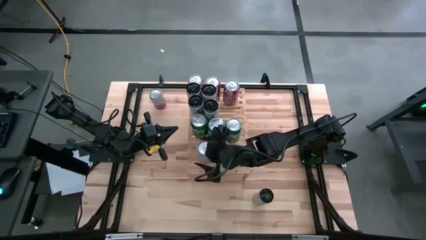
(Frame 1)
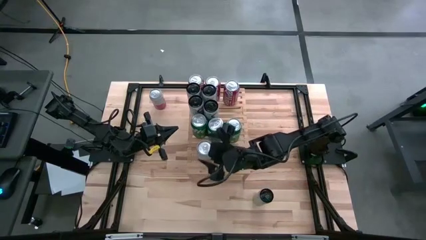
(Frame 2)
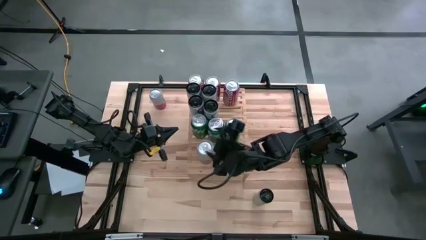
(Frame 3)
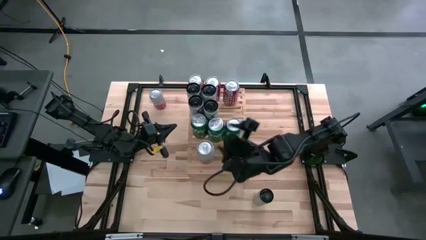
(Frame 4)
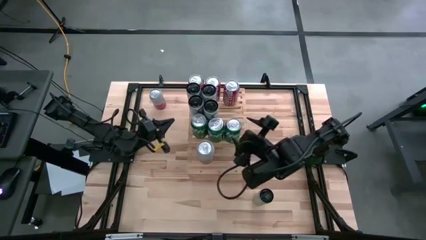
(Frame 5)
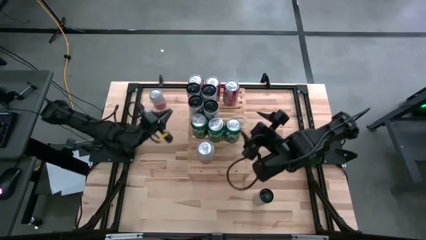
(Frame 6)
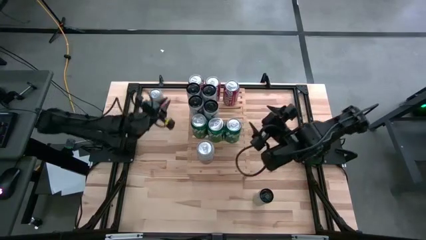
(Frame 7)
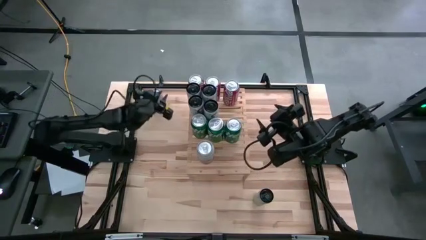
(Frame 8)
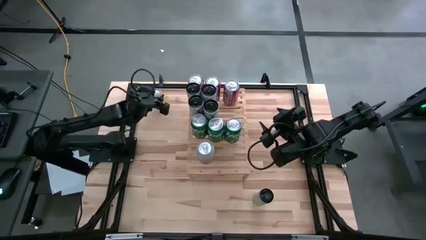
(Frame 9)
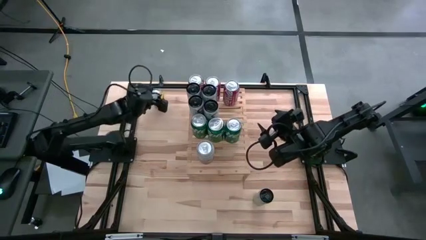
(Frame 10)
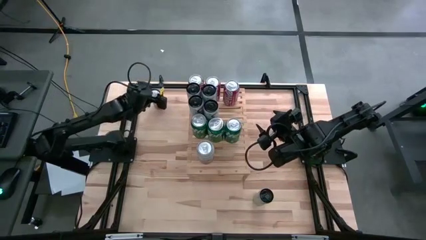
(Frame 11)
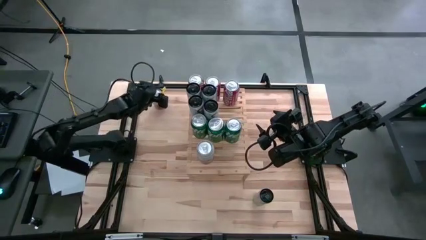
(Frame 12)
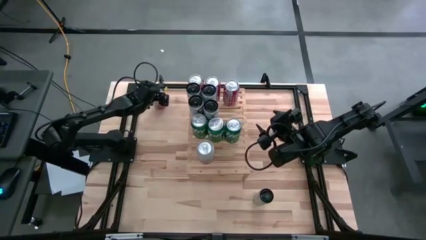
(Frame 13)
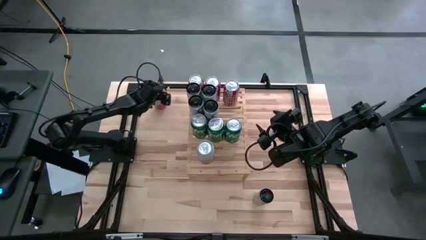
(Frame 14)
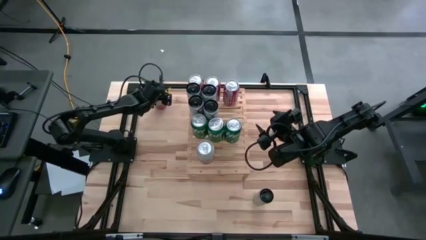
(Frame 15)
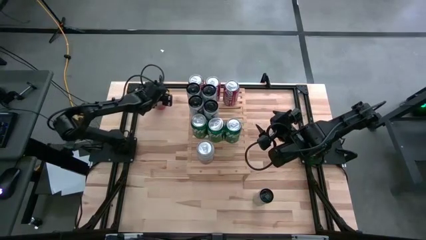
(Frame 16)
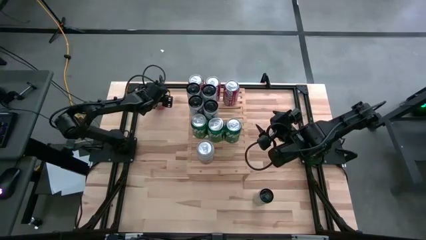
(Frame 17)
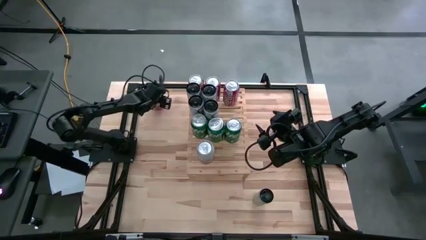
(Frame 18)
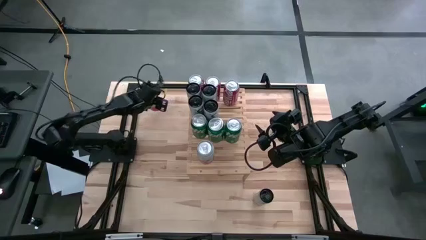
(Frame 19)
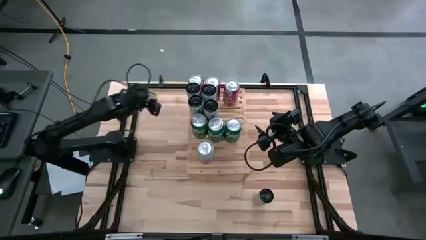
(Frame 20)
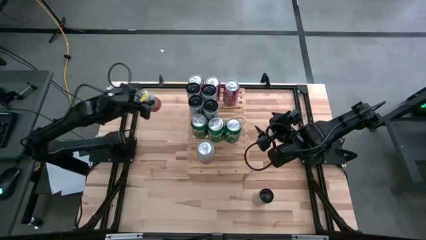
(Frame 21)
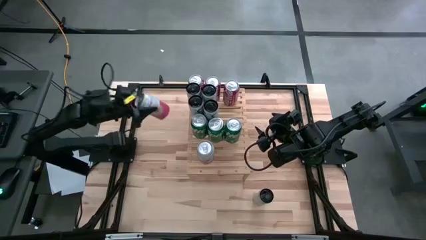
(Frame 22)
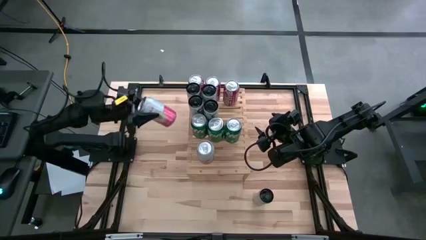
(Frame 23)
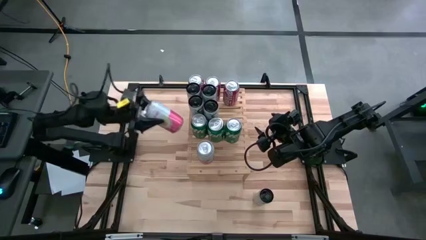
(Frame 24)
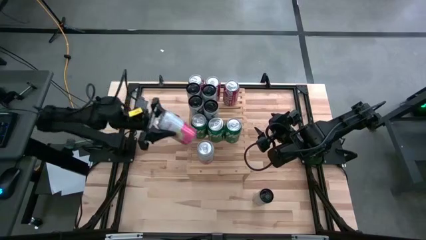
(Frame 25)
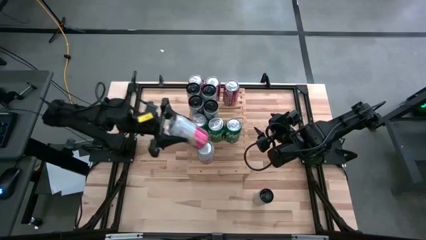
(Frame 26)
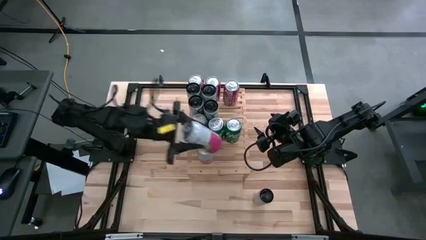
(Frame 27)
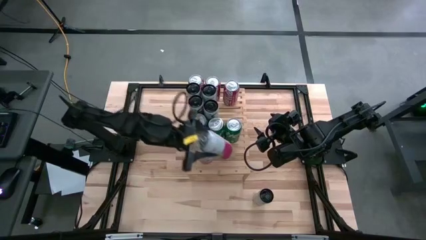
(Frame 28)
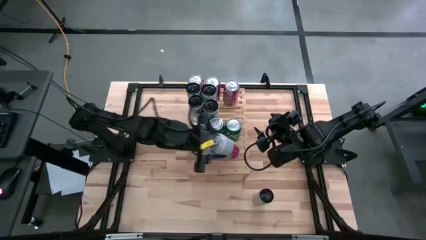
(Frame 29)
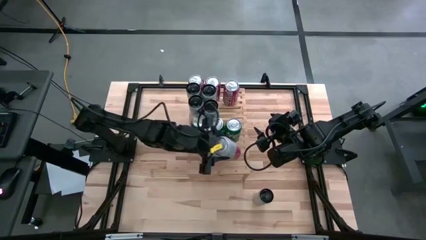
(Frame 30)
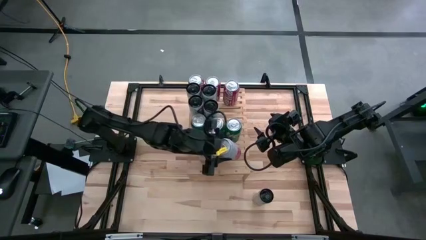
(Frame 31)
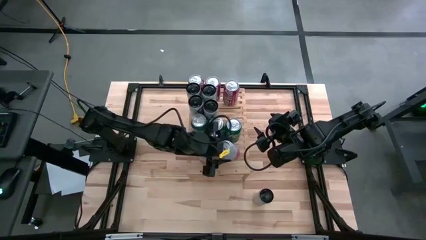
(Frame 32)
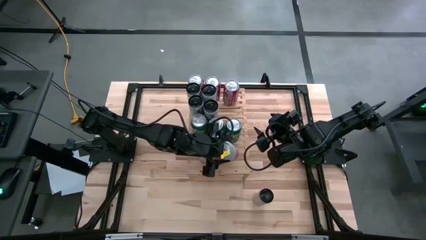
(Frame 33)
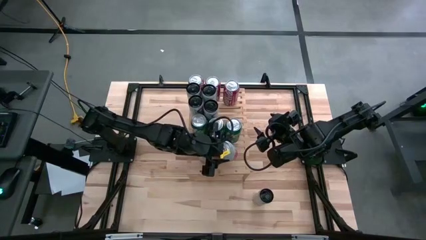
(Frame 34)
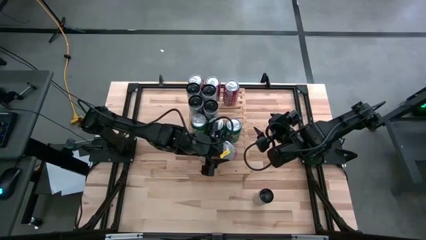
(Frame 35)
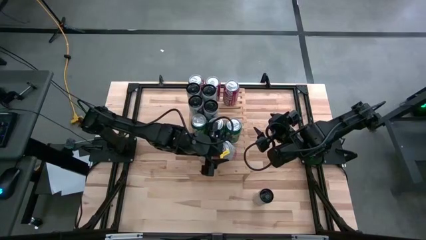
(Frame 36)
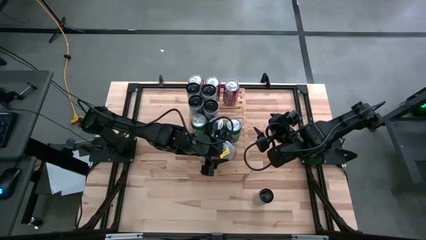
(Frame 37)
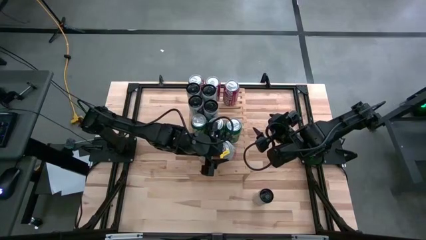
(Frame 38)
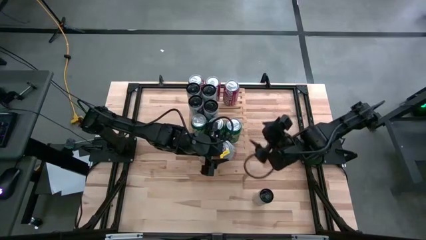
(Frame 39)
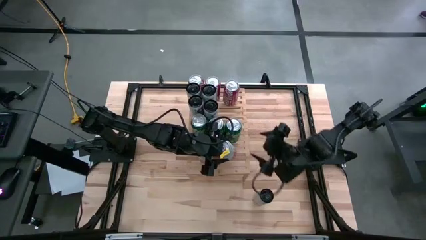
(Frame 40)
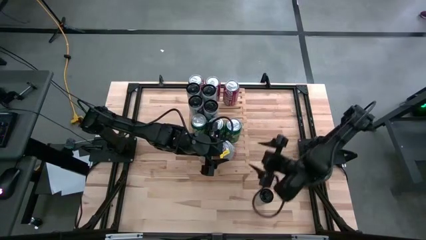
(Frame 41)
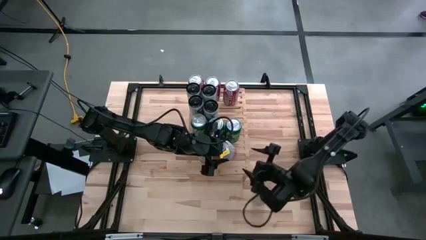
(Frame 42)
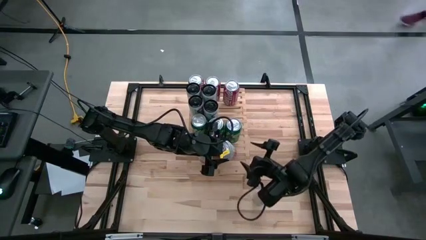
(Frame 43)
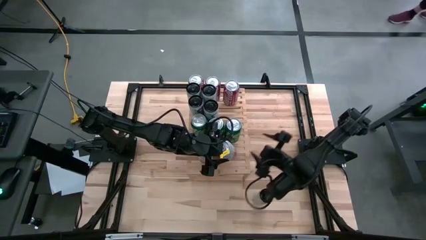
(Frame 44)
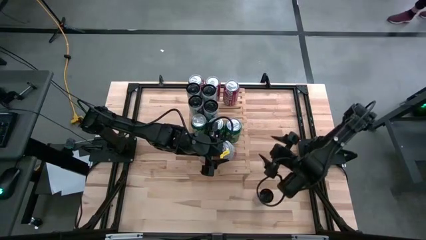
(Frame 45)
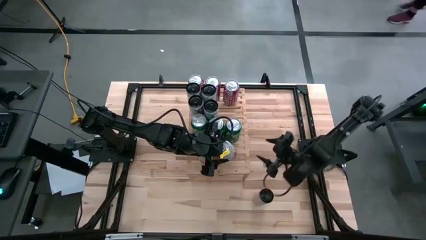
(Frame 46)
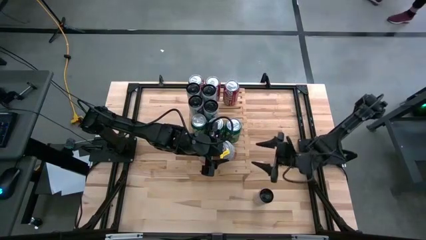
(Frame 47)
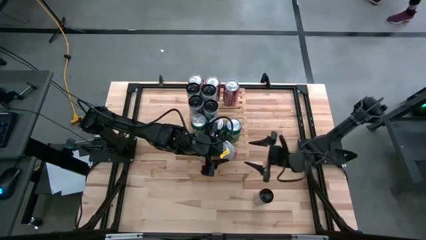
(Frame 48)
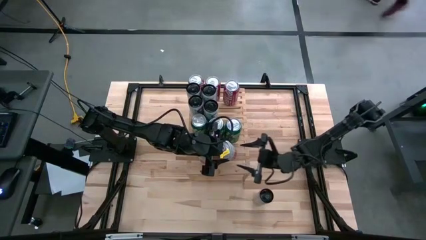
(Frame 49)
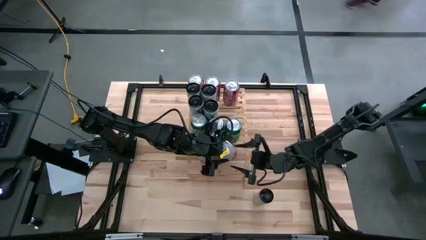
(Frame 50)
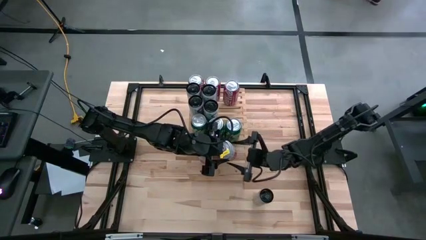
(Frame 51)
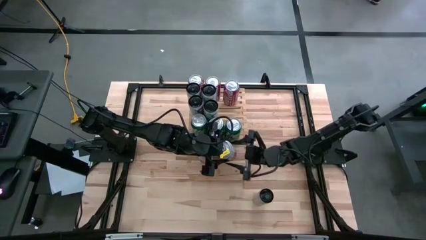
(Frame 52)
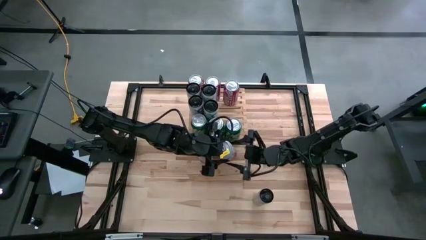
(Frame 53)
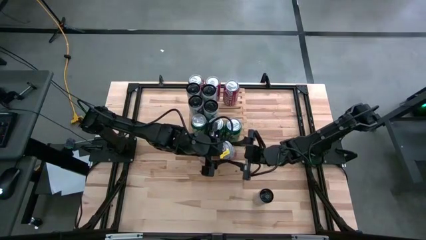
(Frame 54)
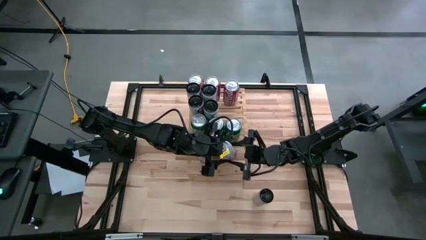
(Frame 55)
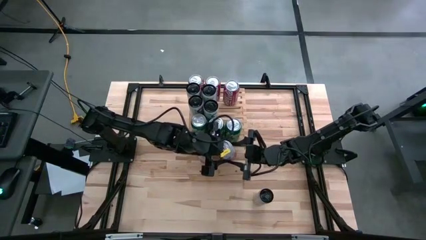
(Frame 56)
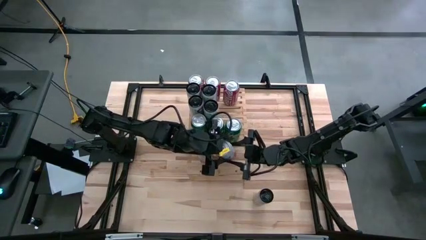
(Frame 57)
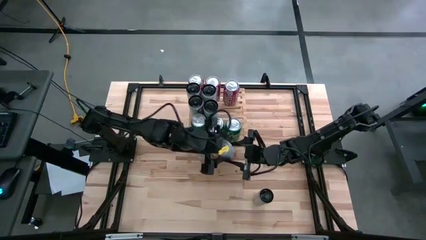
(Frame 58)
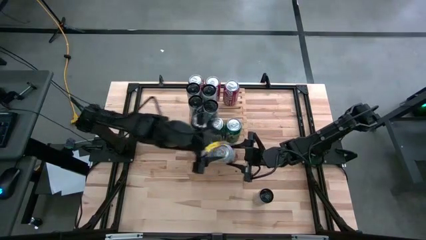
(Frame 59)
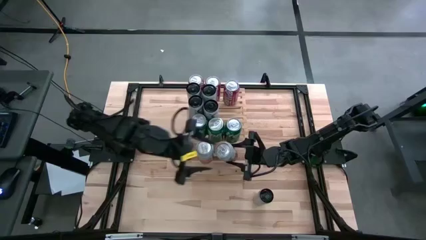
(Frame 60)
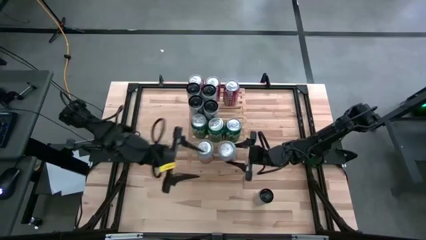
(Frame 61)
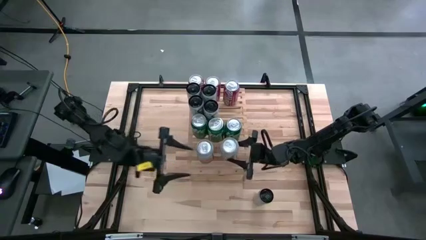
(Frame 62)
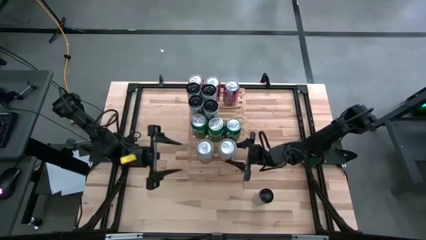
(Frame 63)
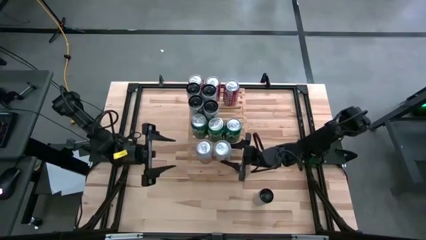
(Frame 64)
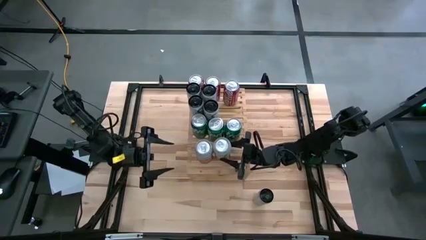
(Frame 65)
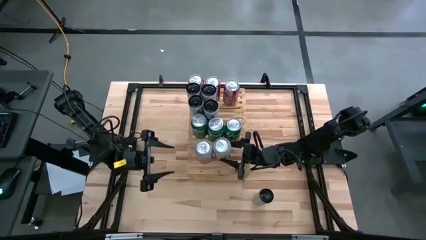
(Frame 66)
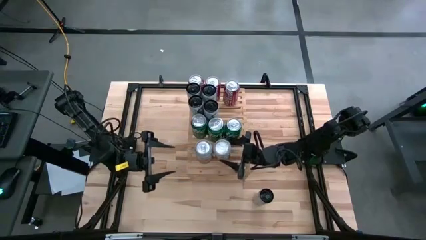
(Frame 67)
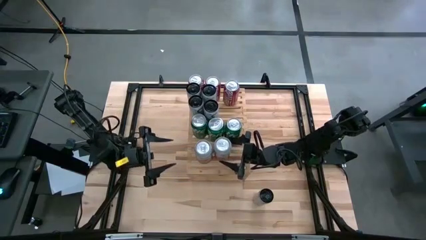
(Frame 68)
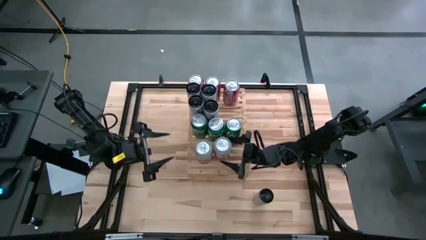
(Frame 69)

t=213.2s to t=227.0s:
Task: Place canned beverage on shelf
Align the pink soda can with the other pink soda can on the shelf
